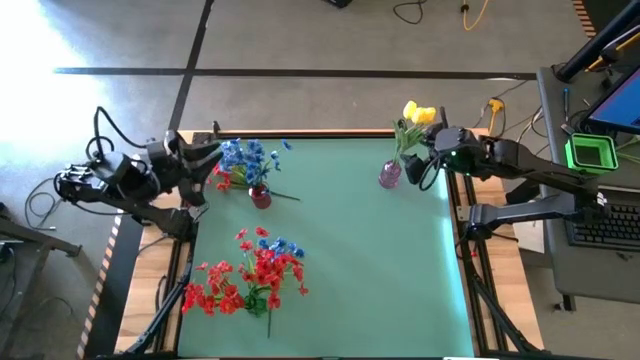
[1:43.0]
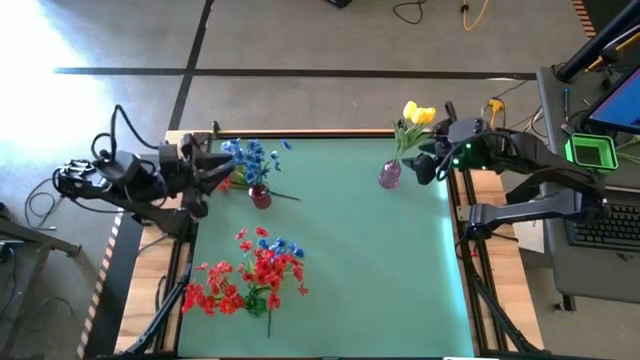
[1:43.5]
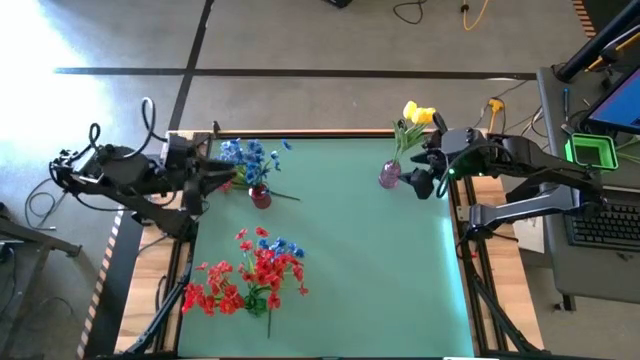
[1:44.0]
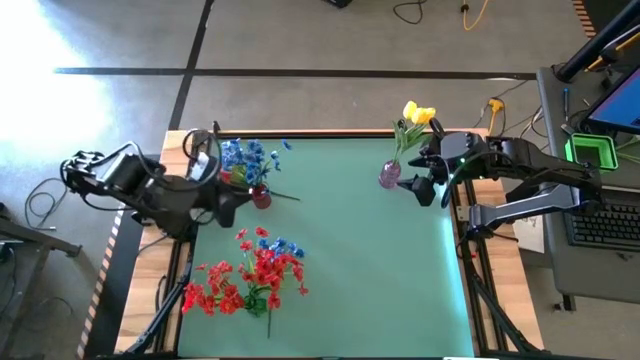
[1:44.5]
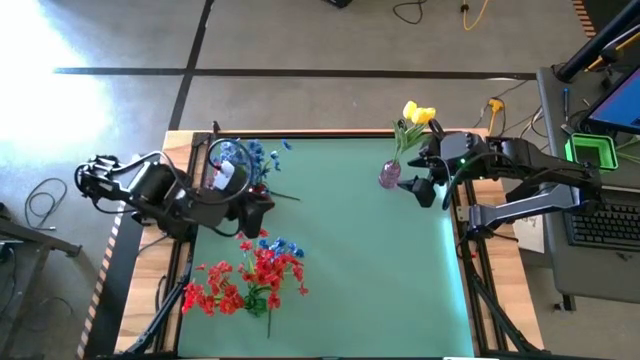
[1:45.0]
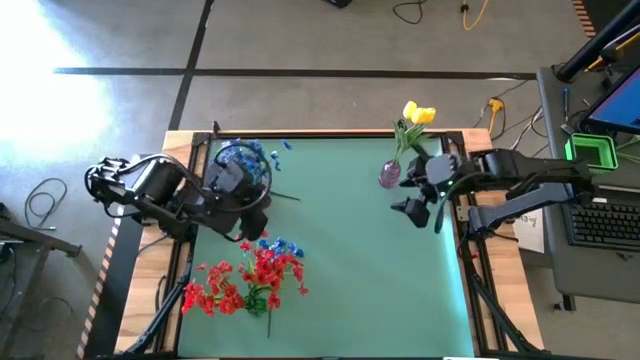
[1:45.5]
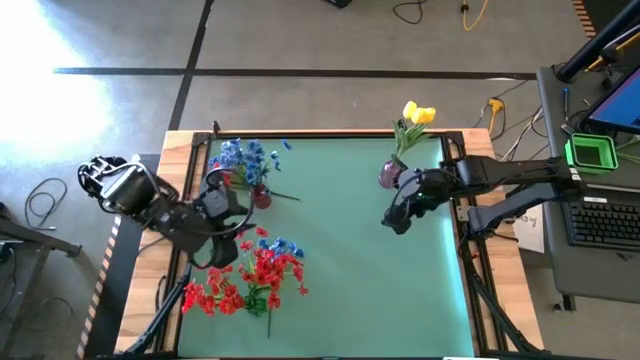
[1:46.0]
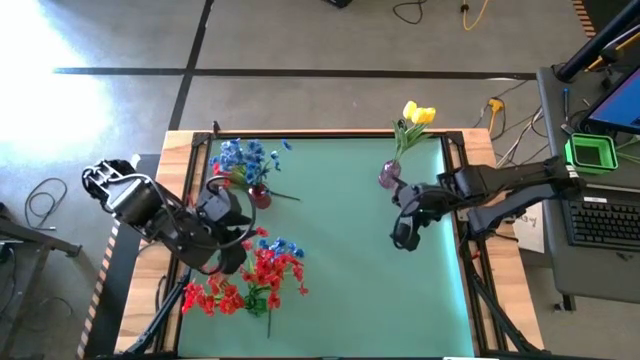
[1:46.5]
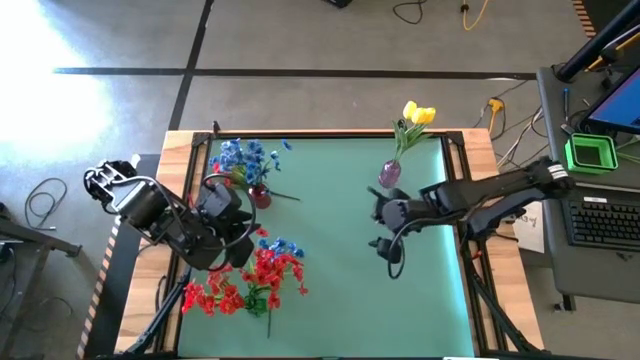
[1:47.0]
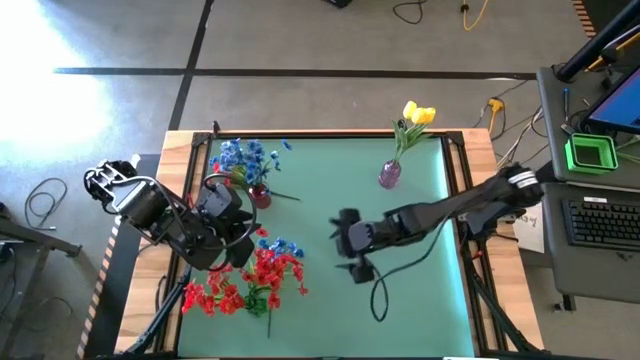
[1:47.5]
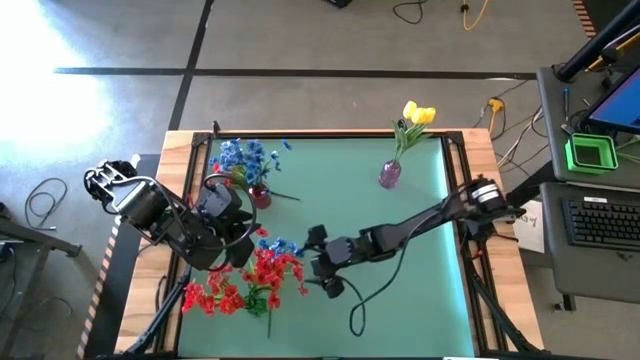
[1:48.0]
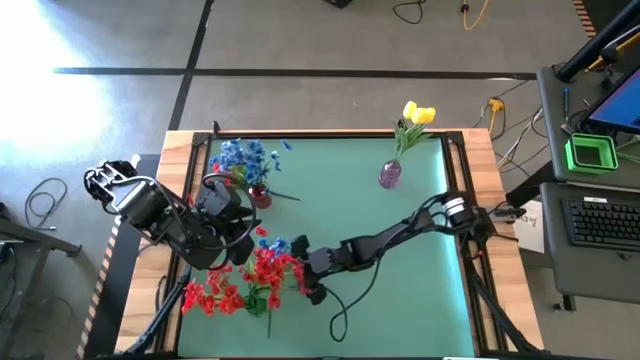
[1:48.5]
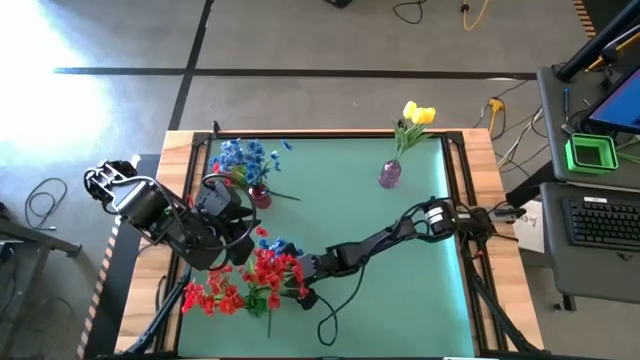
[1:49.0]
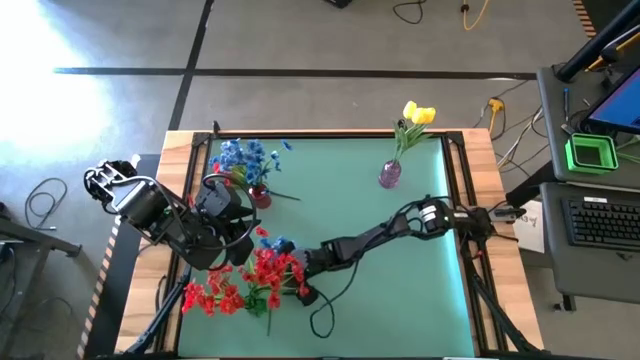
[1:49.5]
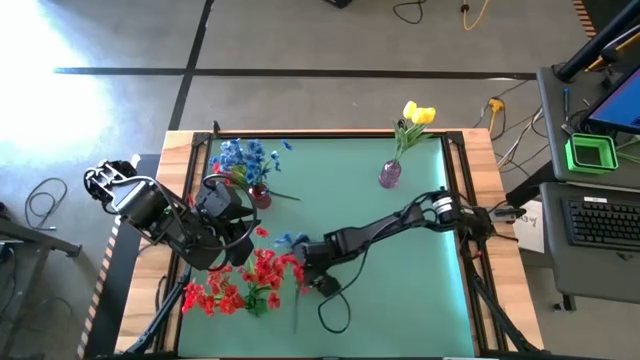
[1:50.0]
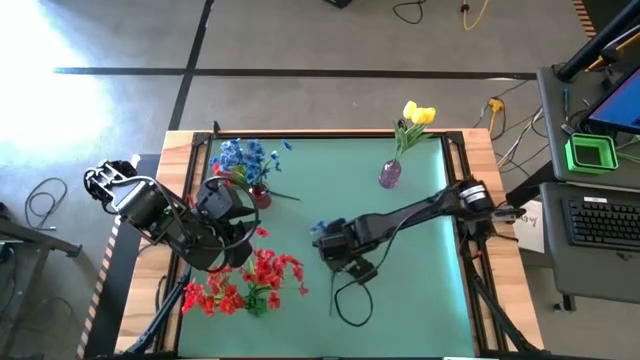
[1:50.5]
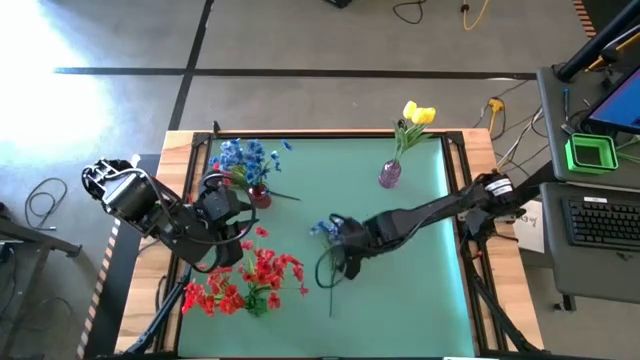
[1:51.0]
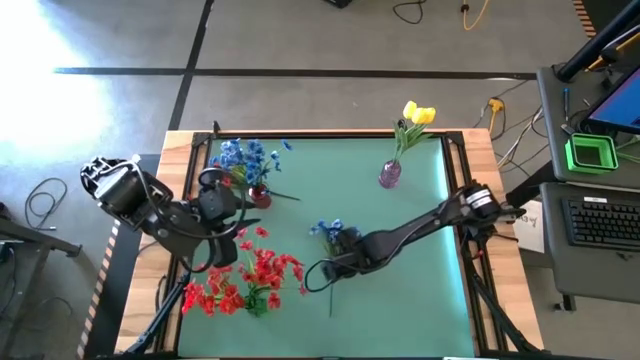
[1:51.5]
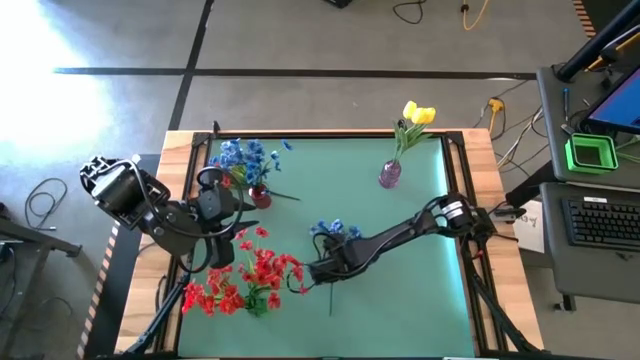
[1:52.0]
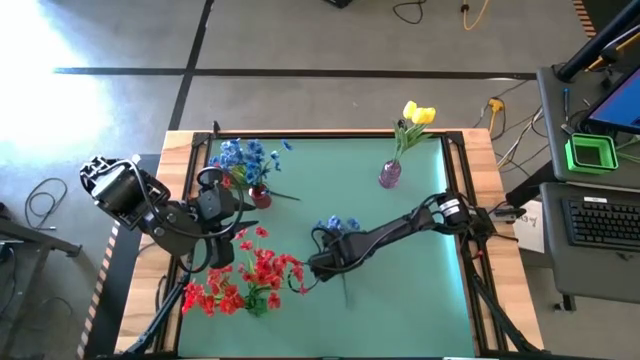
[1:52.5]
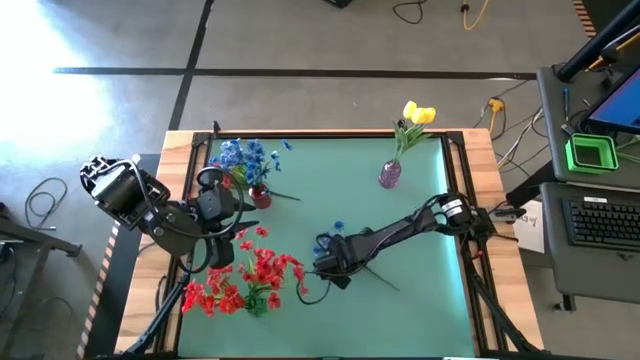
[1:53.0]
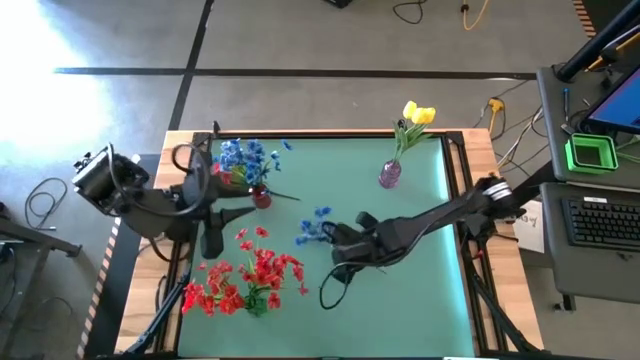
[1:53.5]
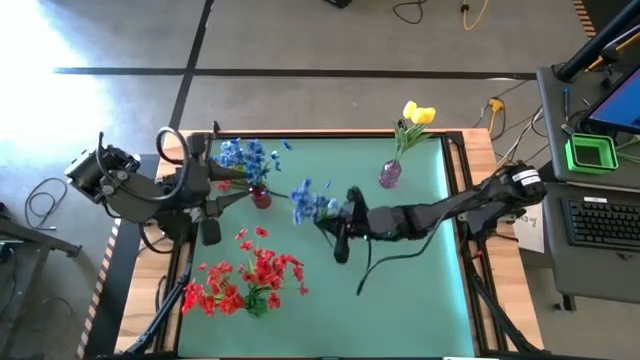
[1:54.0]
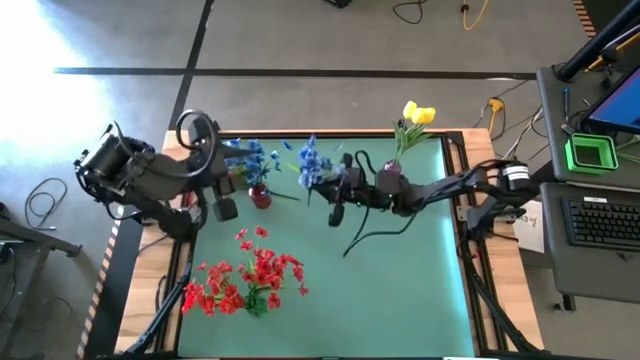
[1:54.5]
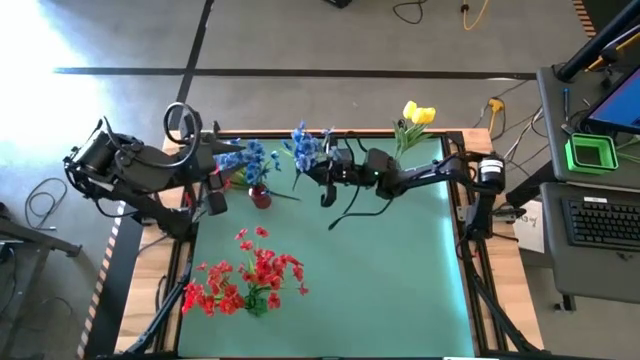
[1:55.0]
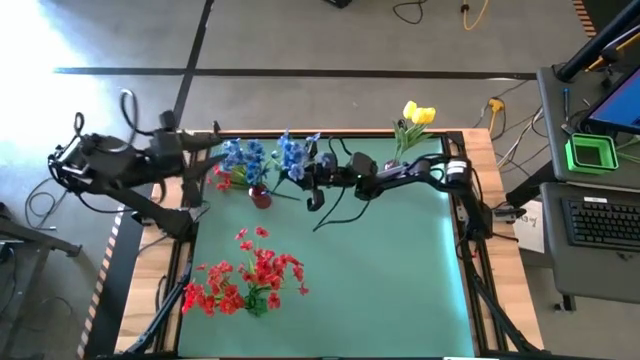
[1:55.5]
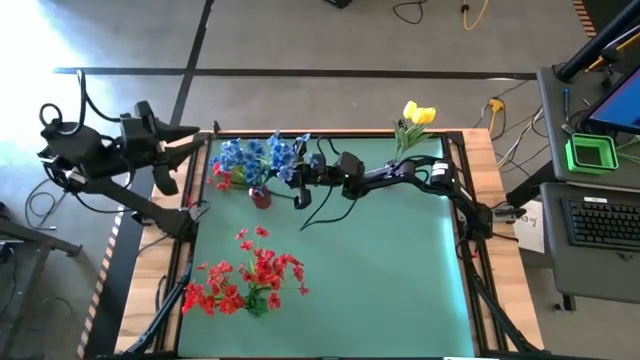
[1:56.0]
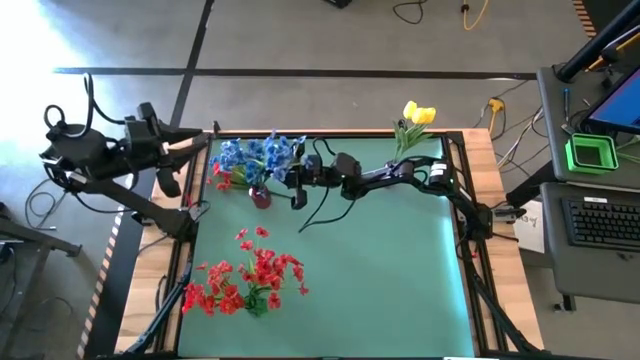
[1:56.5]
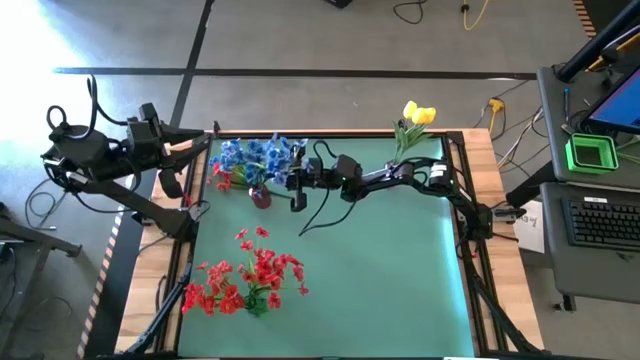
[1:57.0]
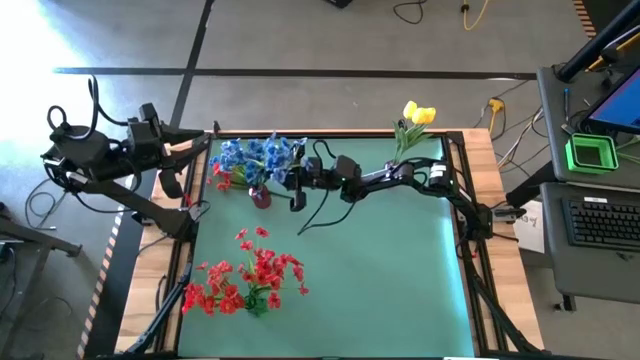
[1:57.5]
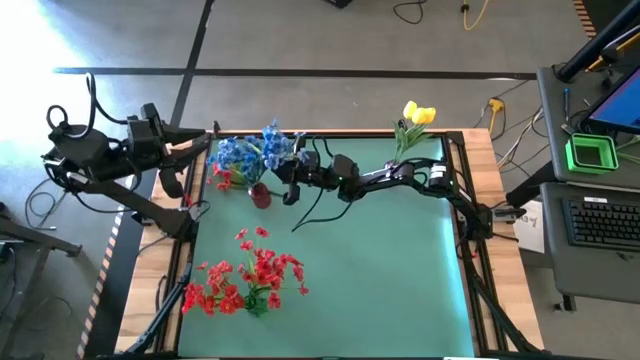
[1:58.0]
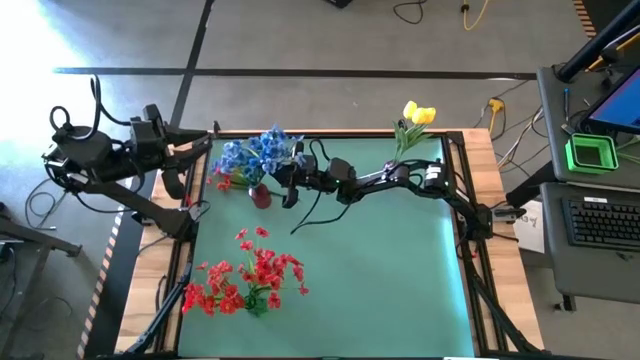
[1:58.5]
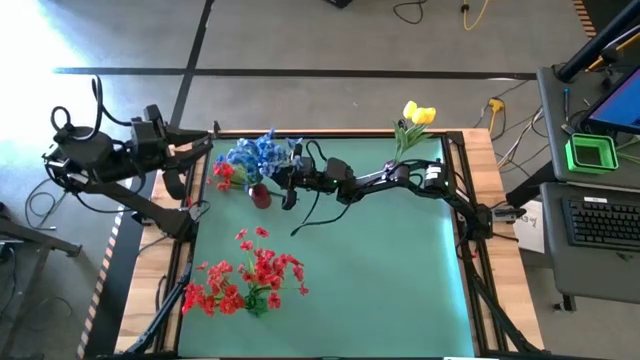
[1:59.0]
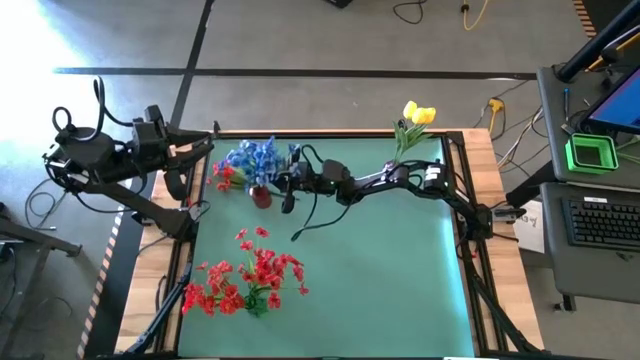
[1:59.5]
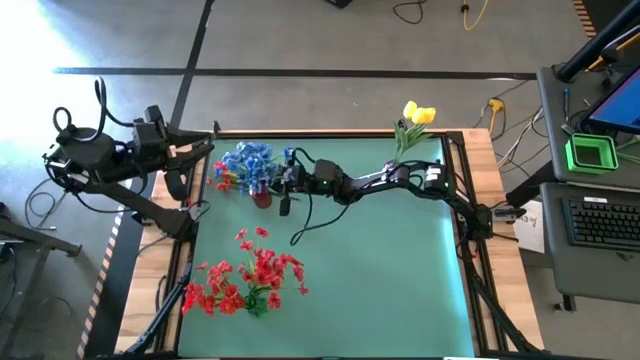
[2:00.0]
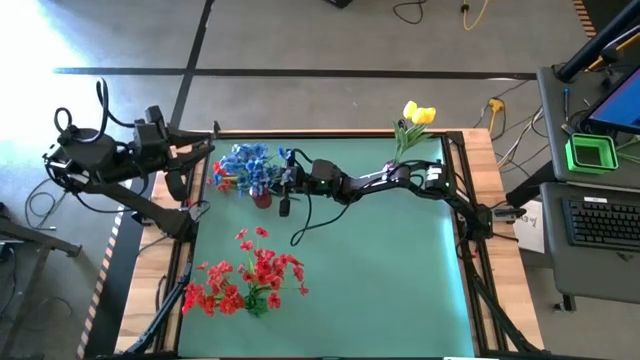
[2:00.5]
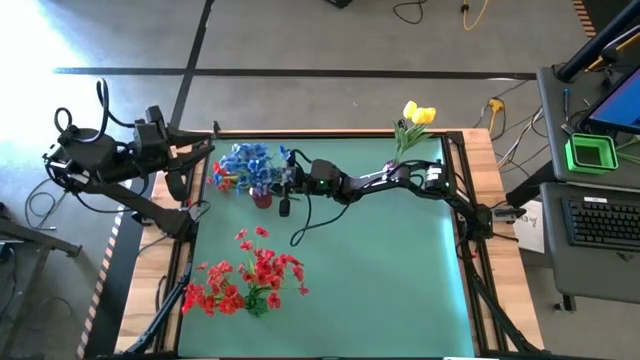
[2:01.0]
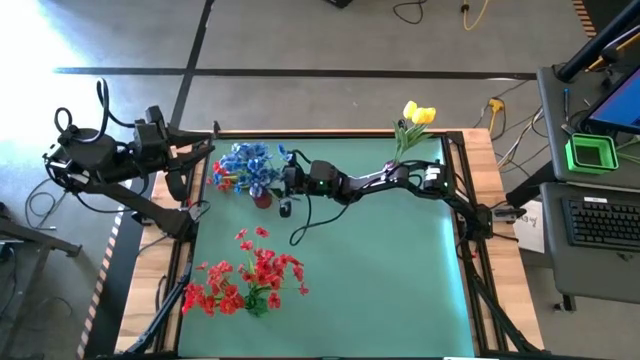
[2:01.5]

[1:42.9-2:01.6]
Task: Sort flowers into vase by color
Put the blue flower into the red vase

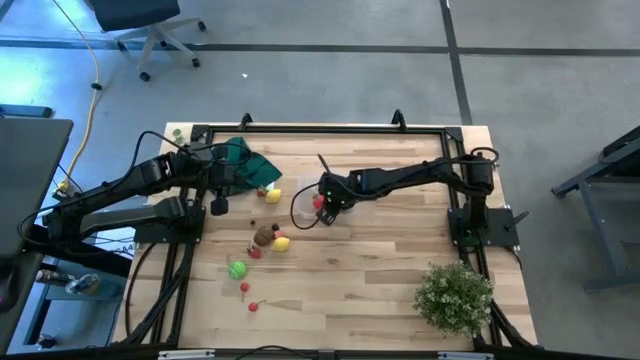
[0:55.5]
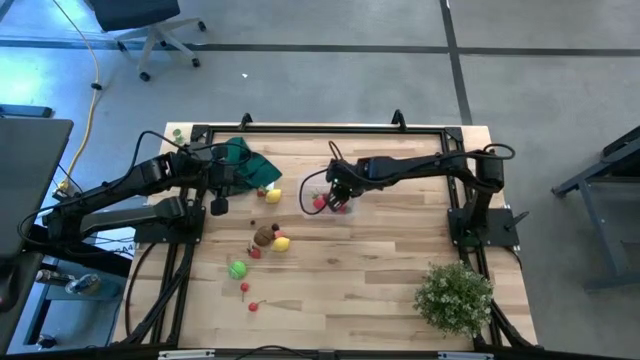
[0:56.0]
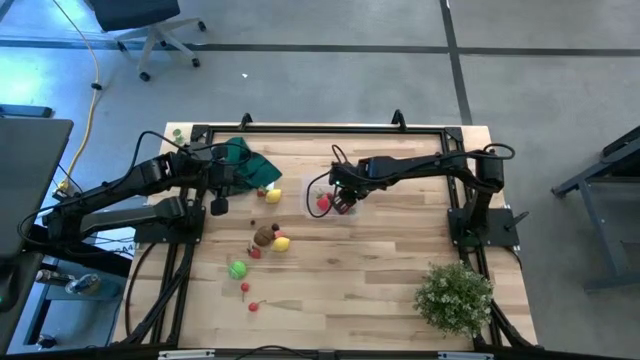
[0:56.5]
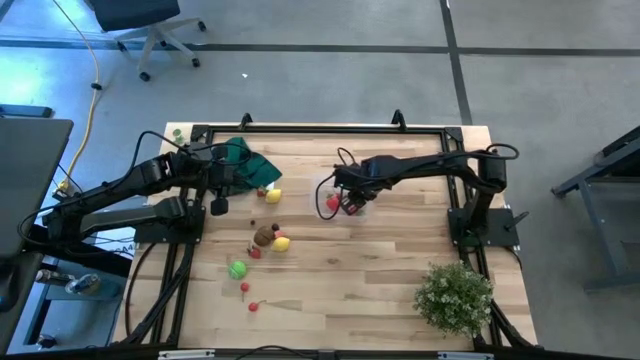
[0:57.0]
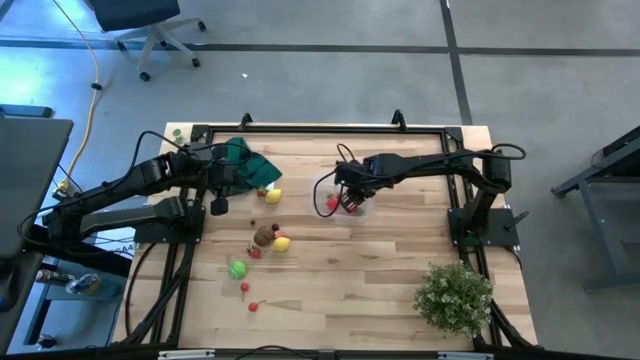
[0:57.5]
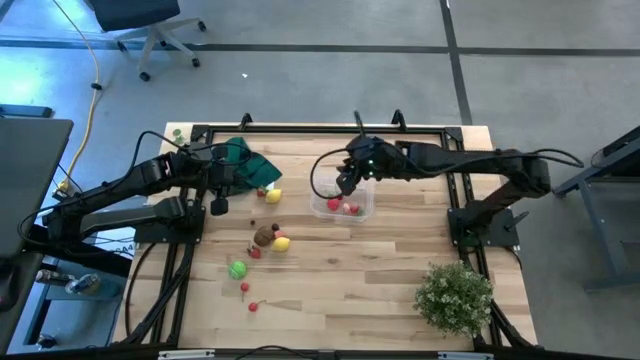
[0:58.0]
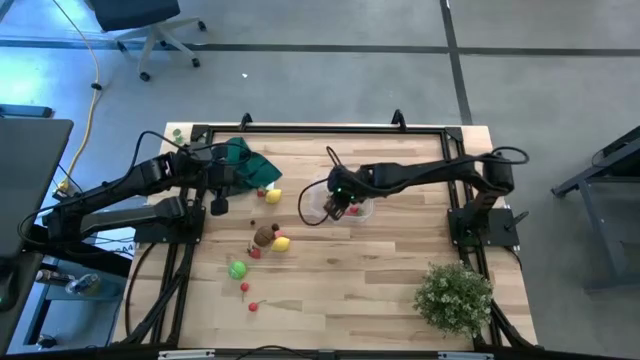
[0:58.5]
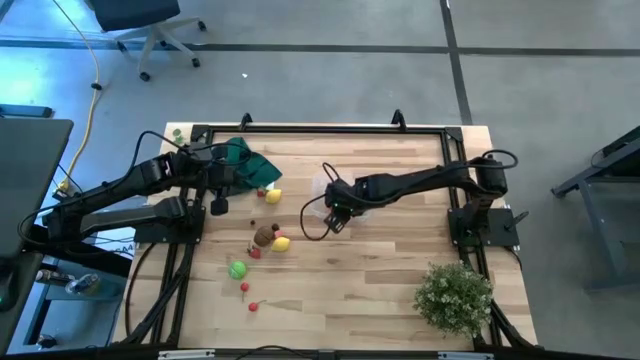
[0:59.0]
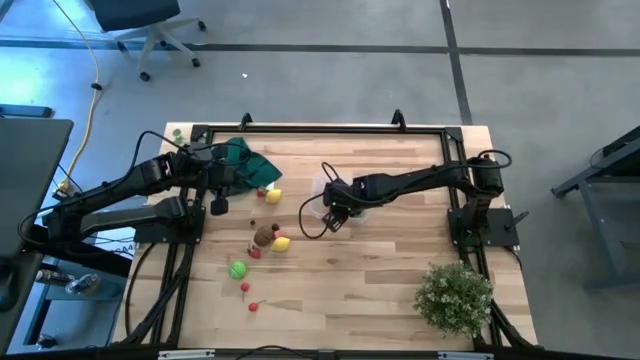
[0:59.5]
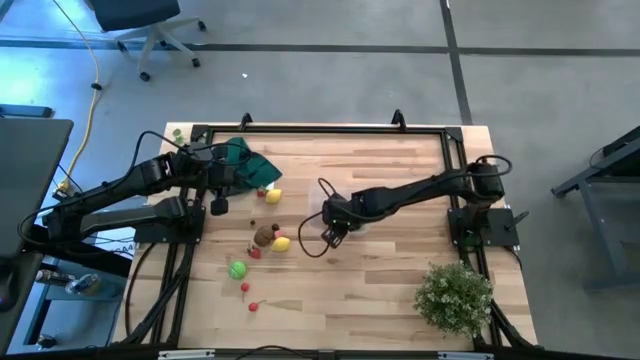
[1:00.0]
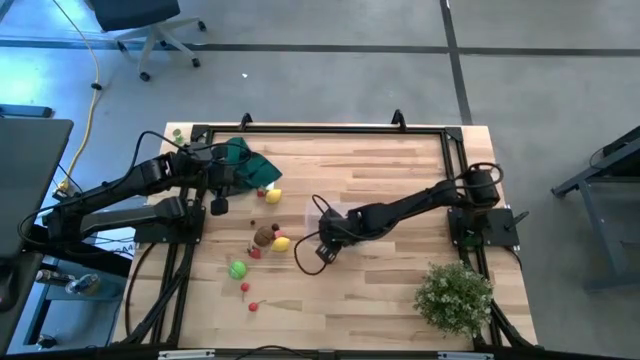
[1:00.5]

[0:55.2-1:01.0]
Task: Pick and placing Produce into tupperware
Adjust the transparent bin on the table
